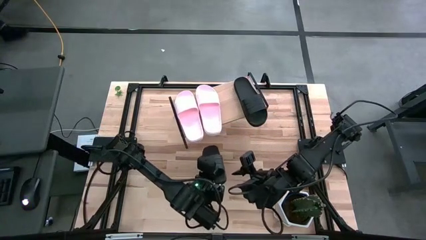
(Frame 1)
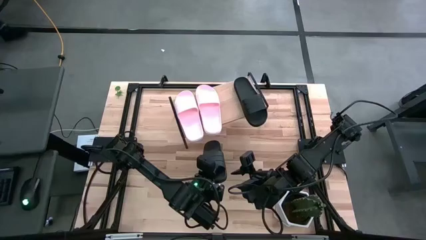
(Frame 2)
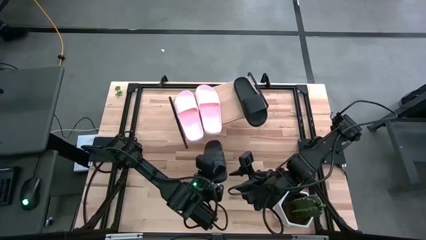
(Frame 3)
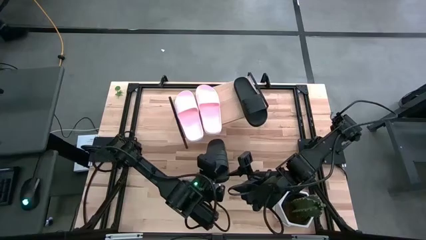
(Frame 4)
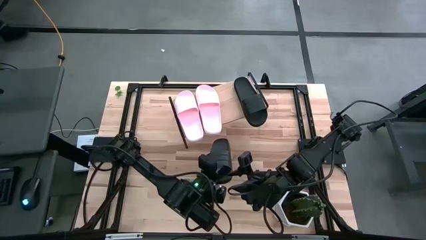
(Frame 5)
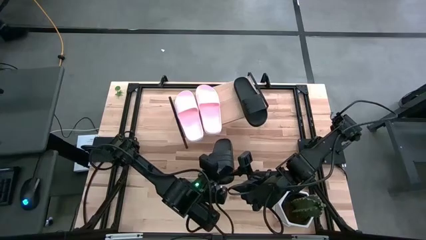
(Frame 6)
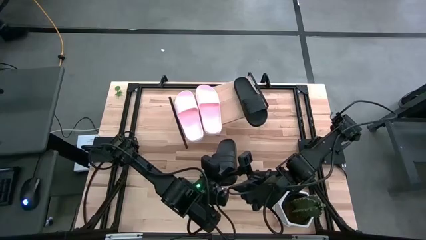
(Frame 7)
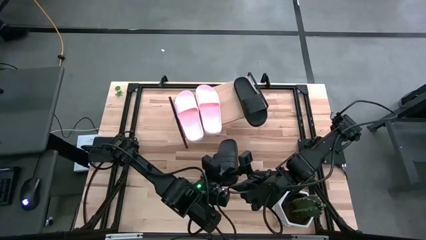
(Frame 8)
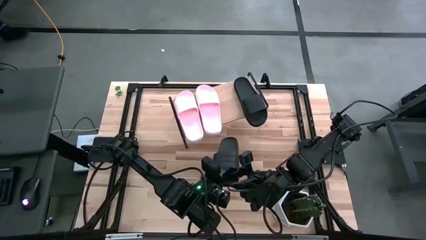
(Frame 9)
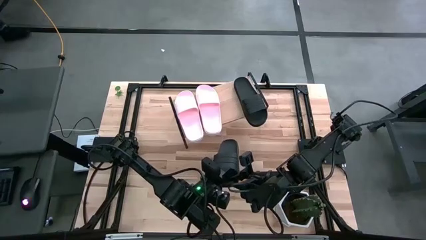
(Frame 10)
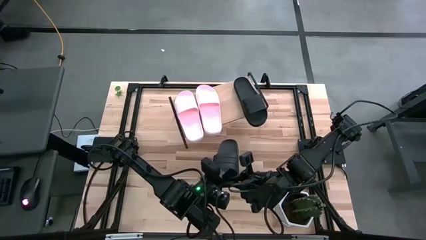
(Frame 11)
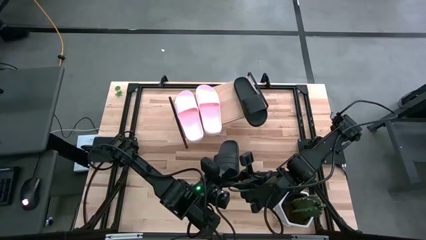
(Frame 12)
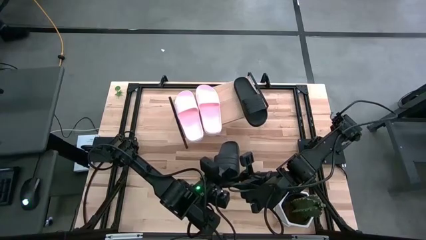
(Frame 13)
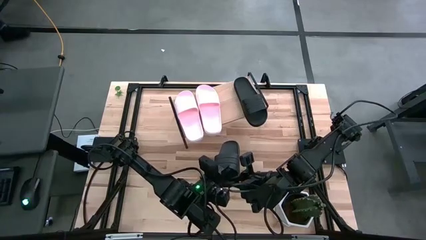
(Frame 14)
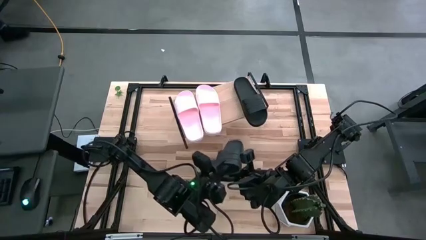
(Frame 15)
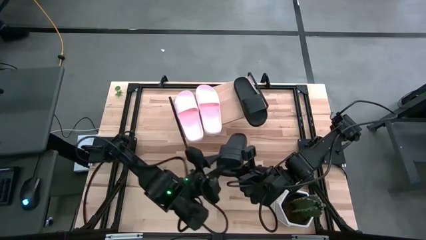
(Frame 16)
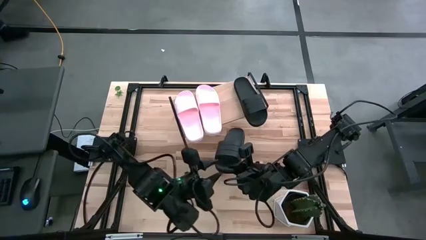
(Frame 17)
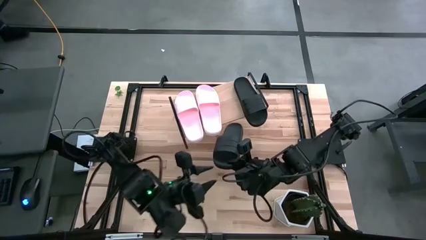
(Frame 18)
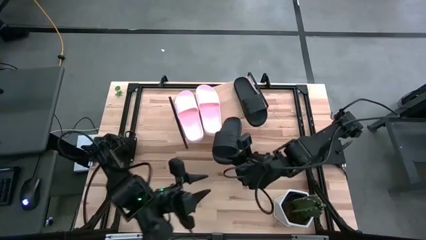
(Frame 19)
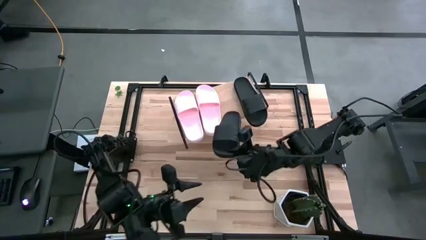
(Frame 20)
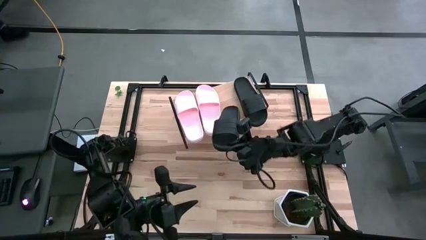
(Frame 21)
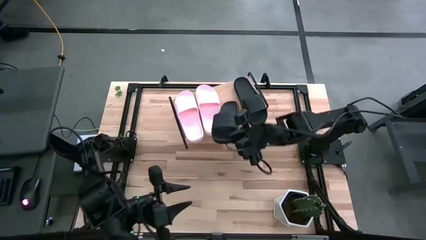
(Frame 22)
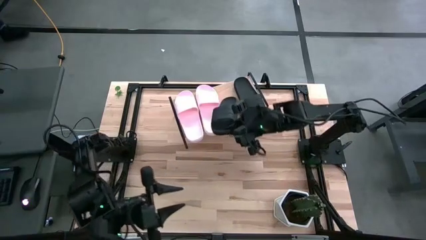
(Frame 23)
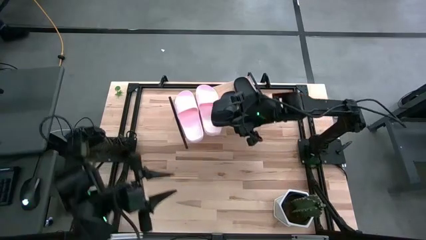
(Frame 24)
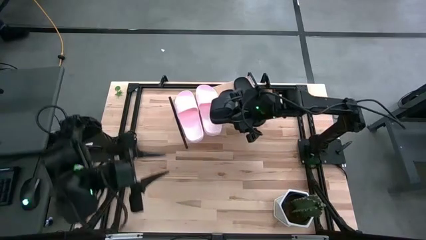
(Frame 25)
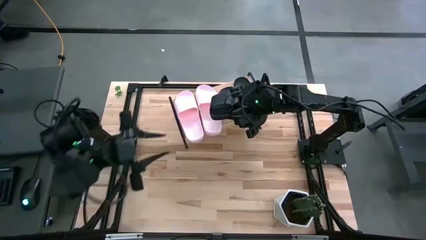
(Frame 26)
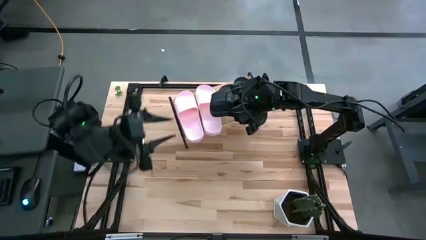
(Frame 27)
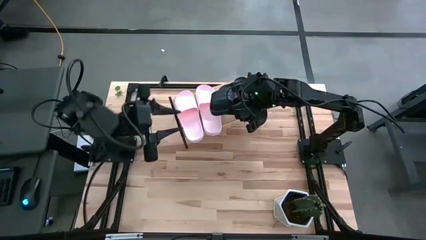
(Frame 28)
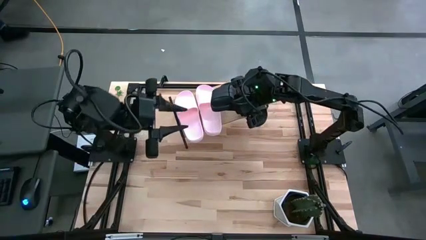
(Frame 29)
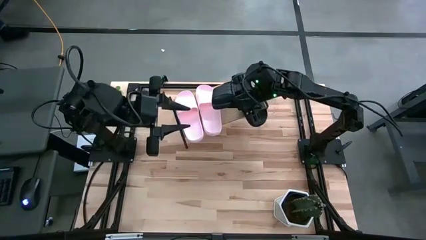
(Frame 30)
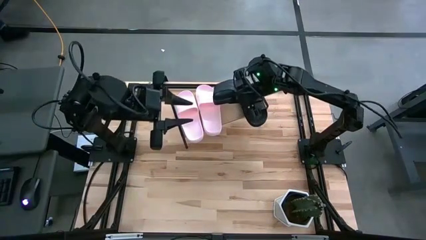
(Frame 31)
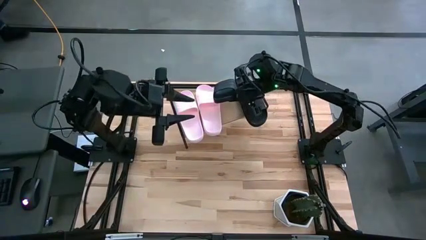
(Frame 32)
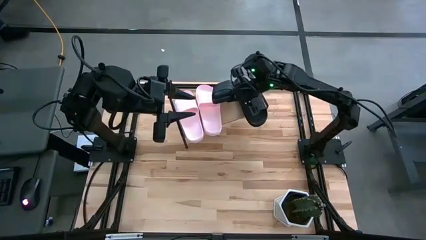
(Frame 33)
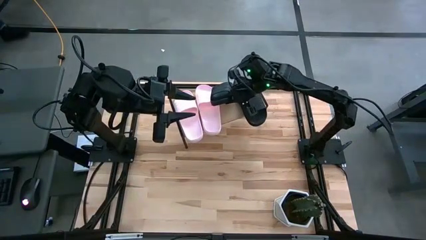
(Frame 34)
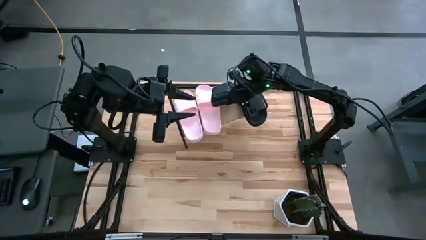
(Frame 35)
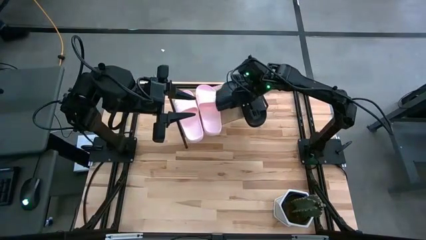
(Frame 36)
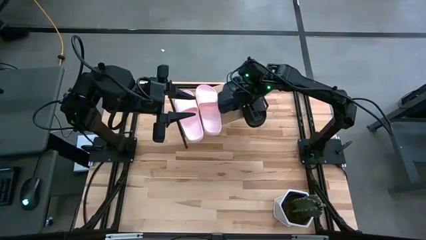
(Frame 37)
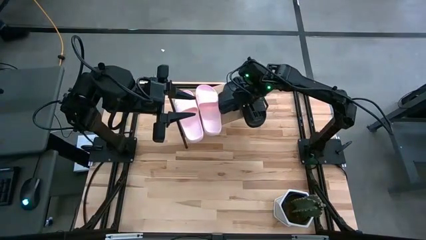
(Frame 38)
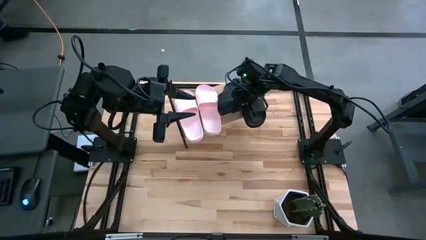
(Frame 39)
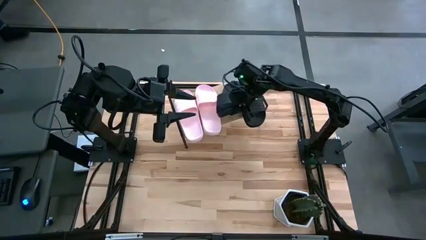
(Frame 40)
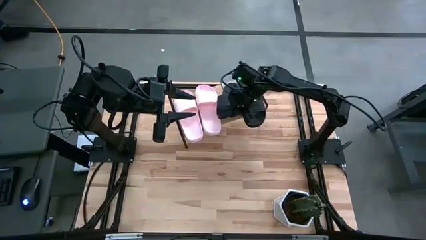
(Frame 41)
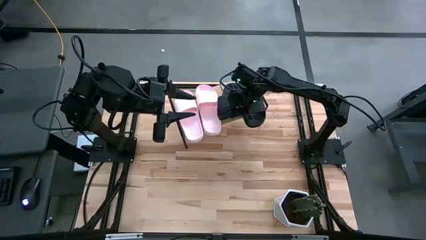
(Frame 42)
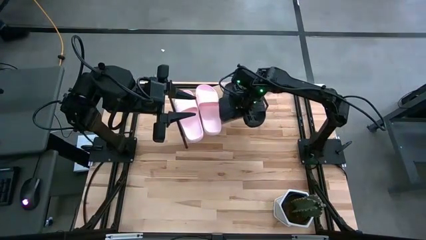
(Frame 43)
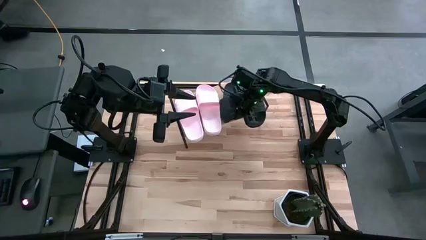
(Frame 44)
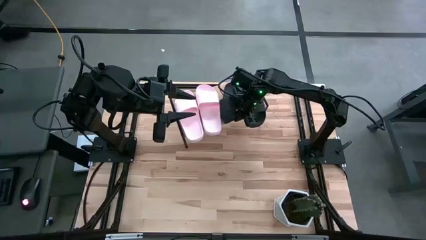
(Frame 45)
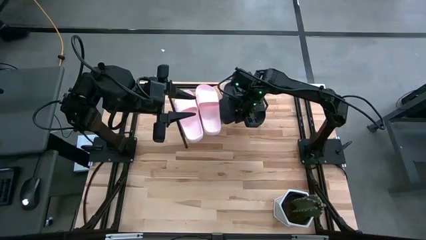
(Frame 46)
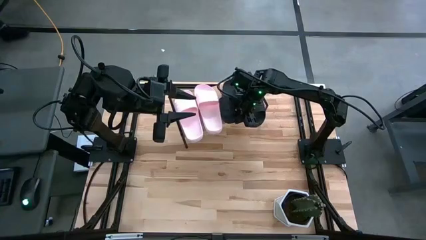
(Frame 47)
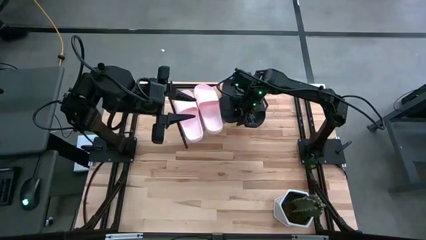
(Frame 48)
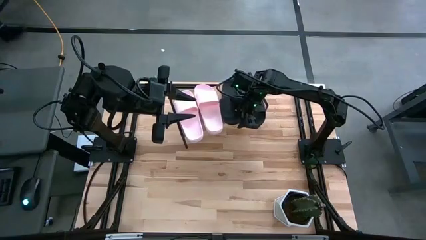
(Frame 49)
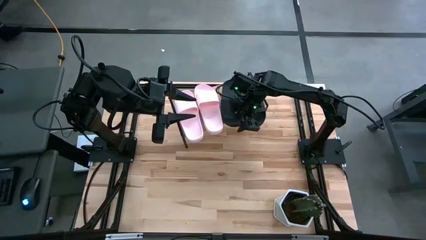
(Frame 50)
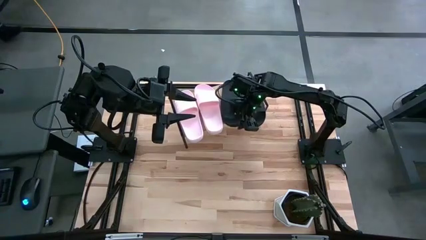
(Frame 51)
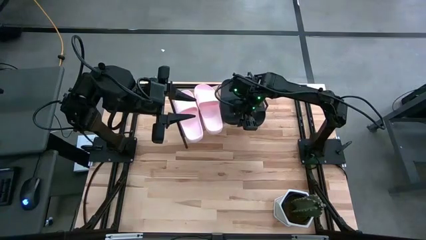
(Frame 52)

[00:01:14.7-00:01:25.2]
Task: Pick and place slides into the shelf
Put the black slide on the shelf

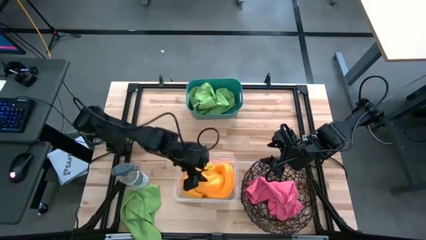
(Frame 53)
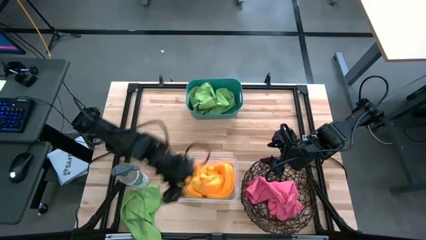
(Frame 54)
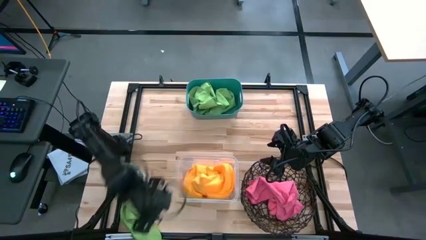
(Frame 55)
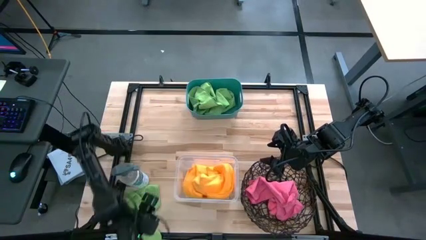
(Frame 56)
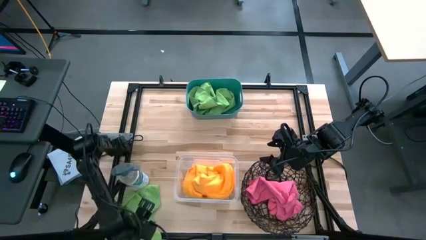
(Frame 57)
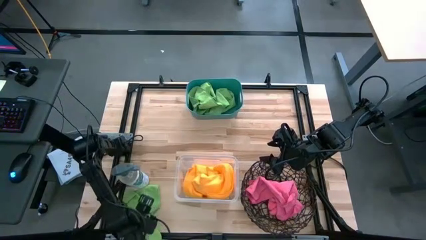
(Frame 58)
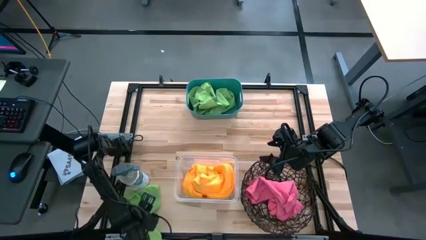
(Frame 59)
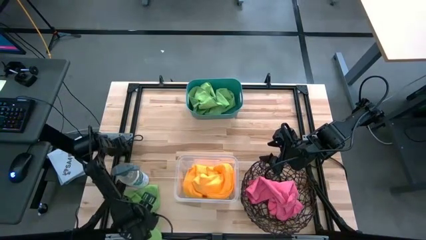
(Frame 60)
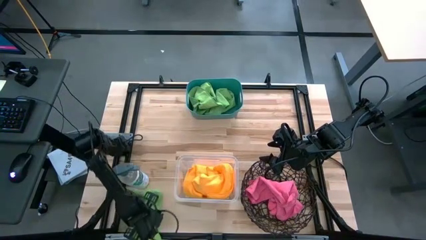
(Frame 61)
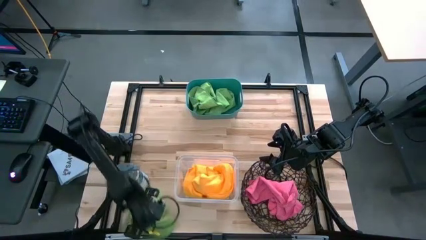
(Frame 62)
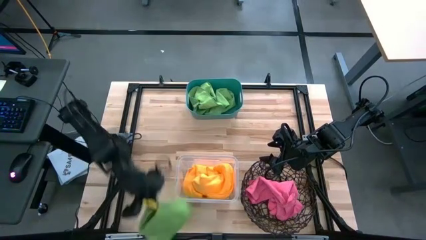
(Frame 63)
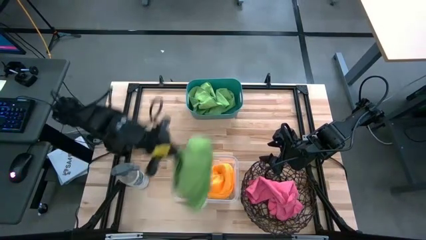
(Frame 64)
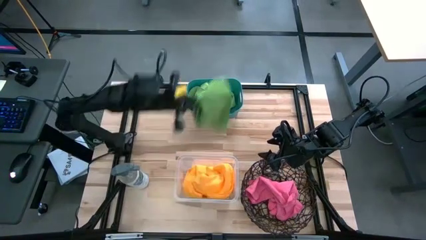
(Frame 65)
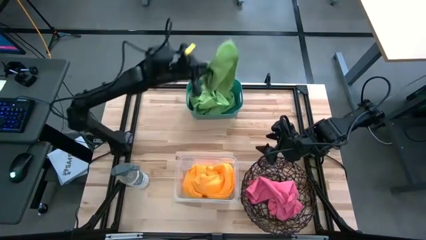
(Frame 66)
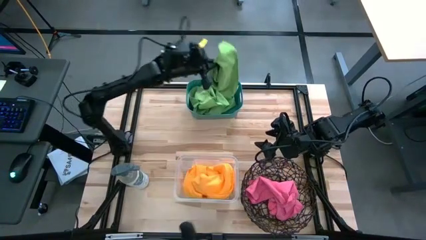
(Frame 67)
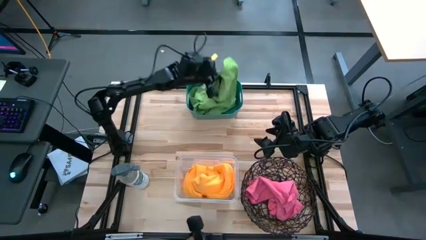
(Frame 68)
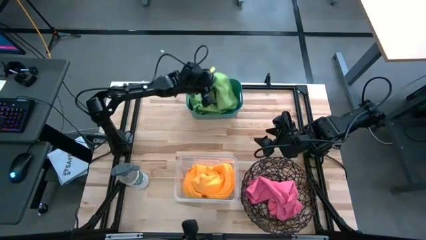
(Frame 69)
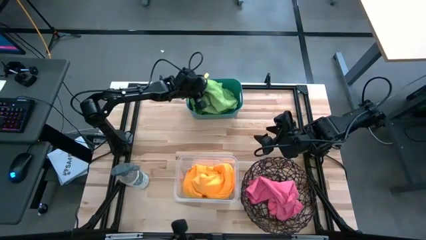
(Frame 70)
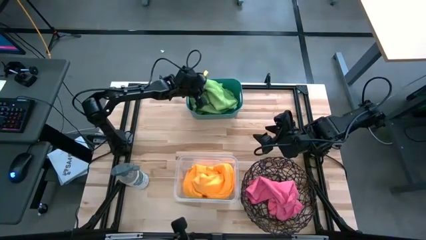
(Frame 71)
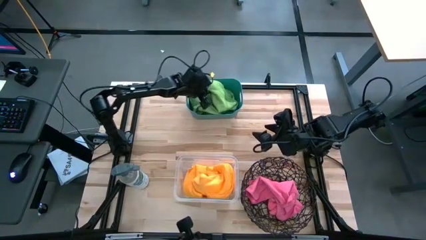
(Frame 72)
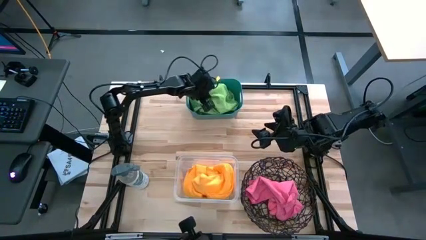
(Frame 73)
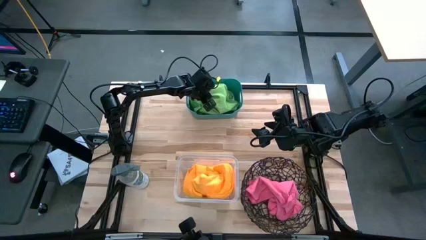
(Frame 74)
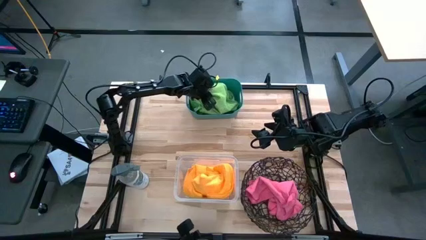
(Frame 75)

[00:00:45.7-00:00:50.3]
Task: Sort microfiber towel by color & place in baskets
Put the green microfiber cloth into the green bin

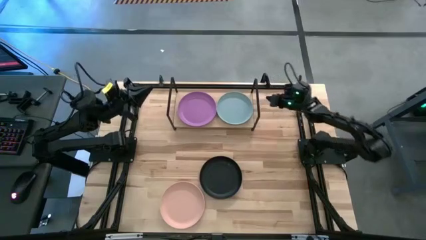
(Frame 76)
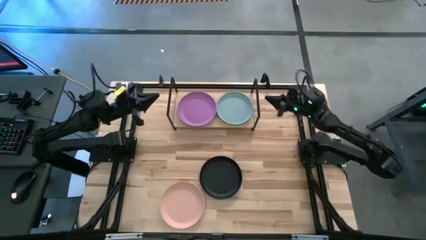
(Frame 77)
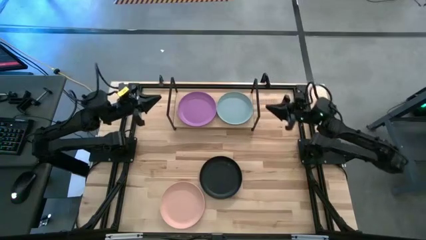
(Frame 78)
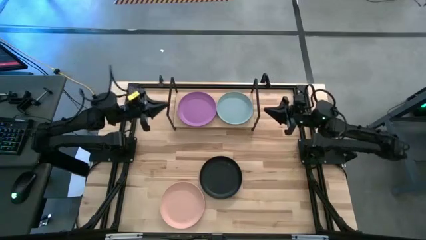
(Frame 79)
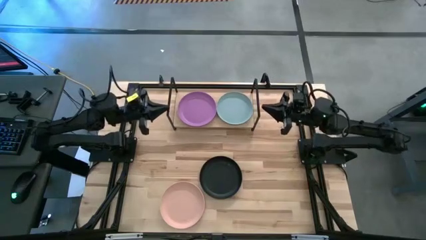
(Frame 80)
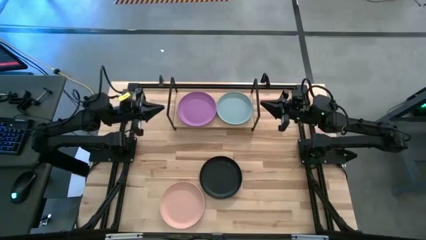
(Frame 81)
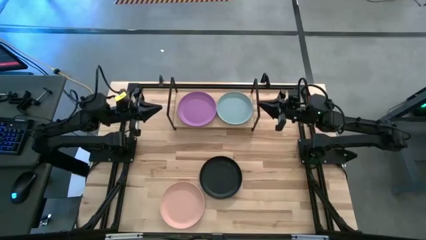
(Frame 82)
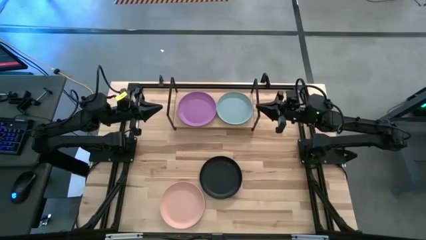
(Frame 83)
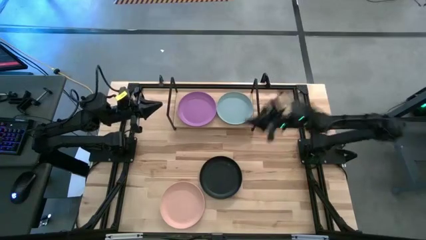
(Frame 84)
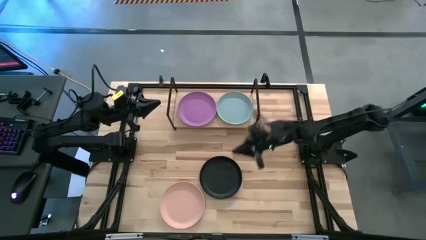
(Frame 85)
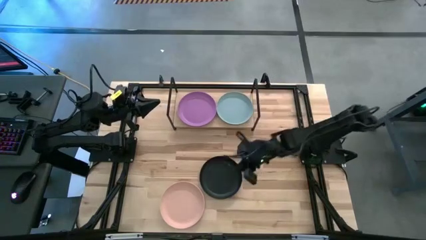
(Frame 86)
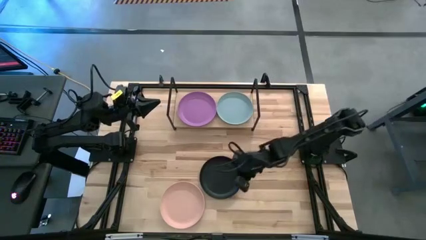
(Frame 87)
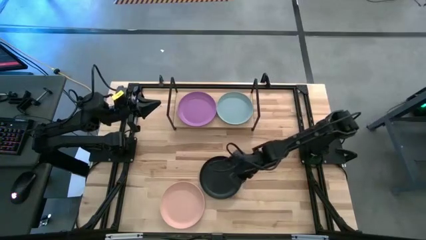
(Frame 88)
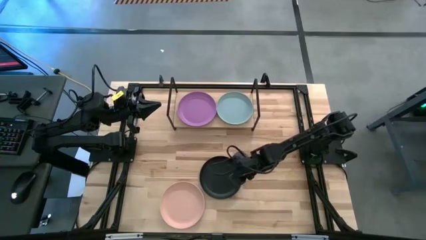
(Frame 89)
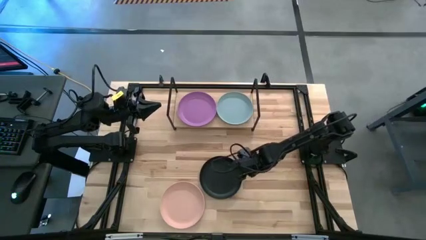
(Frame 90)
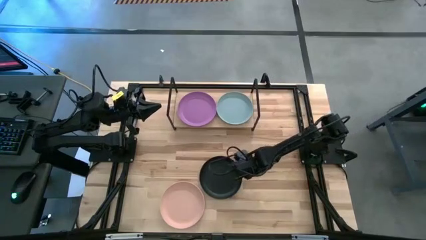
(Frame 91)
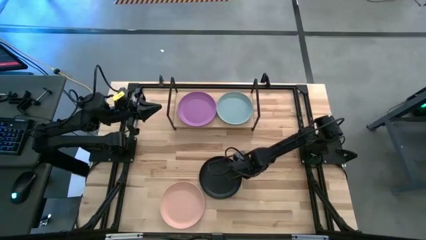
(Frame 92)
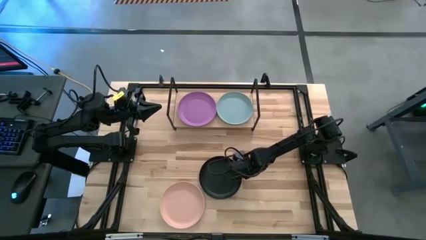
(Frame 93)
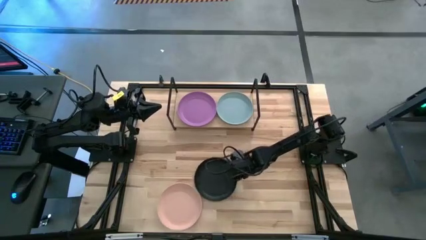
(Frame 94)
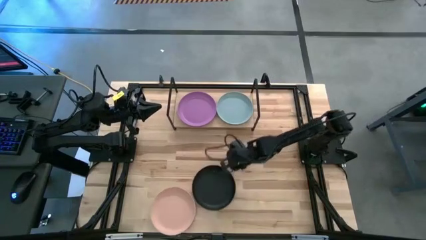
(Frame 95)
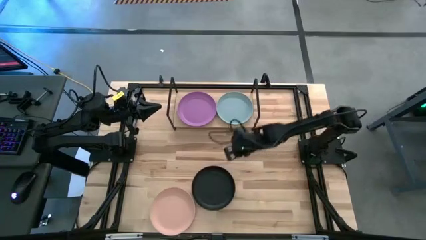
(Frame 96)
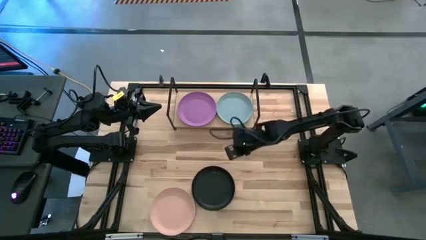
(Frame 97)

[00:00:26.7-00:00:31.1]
Task: Place and stack plates onto a shelf
Stack the black plate on top of the purple plate on the shelf
